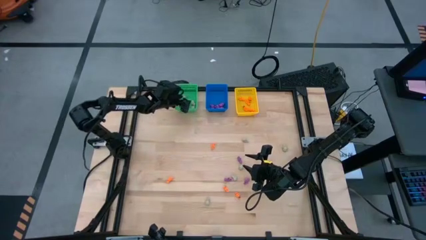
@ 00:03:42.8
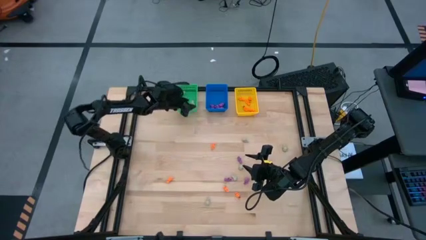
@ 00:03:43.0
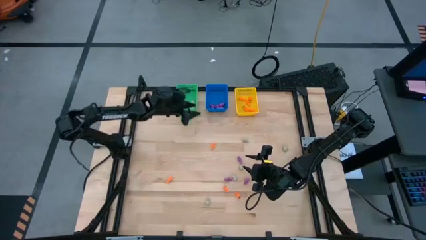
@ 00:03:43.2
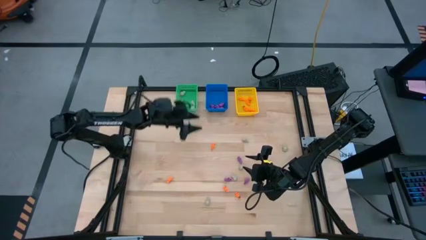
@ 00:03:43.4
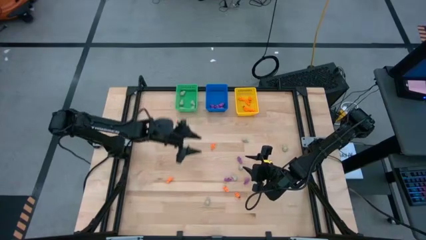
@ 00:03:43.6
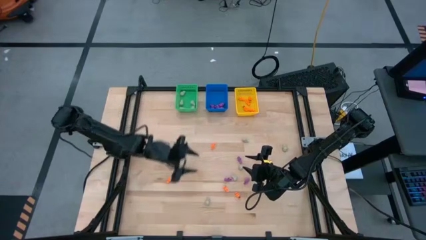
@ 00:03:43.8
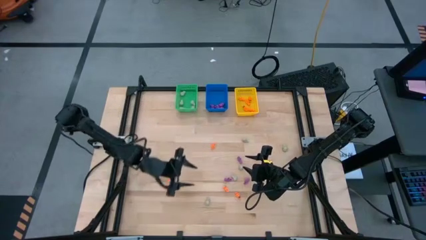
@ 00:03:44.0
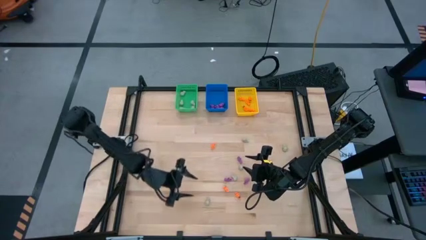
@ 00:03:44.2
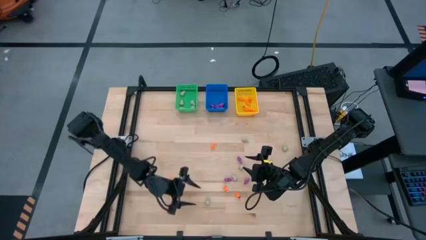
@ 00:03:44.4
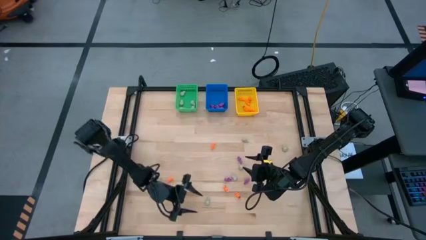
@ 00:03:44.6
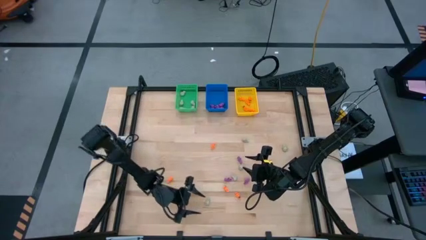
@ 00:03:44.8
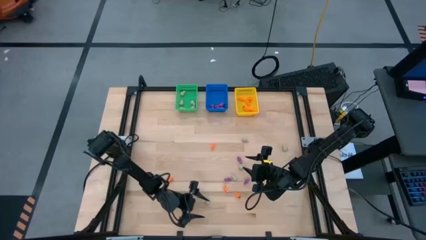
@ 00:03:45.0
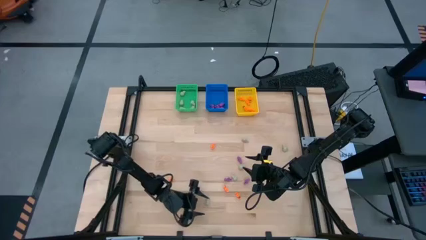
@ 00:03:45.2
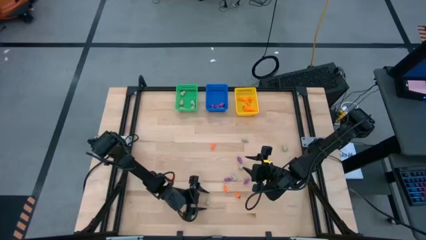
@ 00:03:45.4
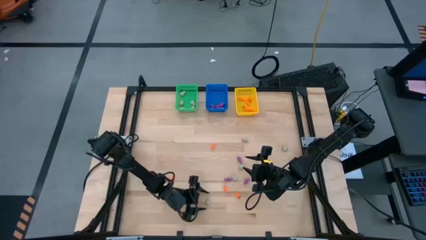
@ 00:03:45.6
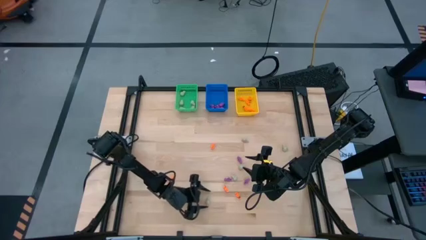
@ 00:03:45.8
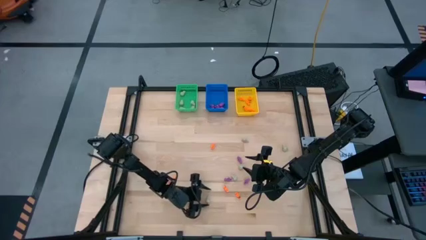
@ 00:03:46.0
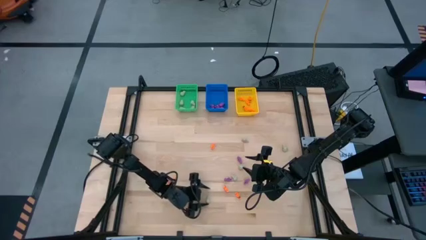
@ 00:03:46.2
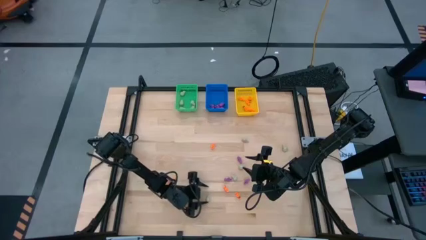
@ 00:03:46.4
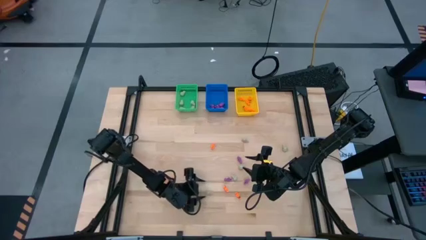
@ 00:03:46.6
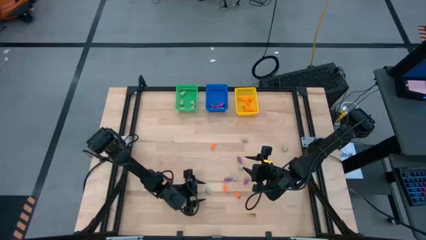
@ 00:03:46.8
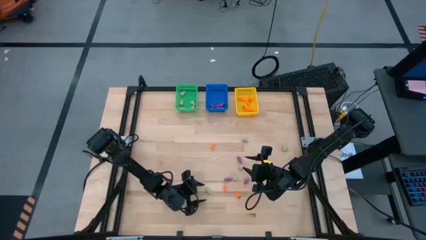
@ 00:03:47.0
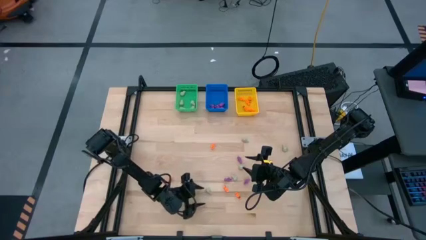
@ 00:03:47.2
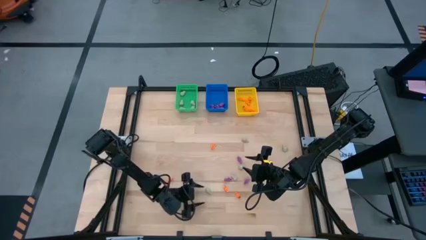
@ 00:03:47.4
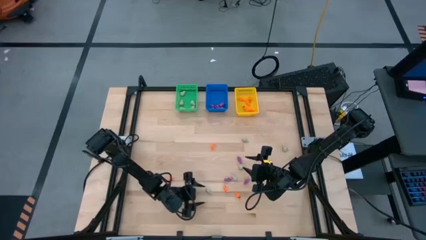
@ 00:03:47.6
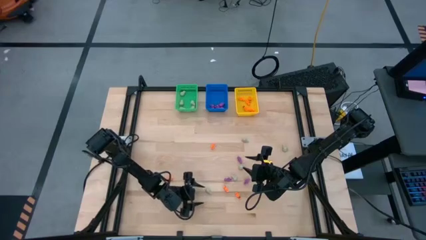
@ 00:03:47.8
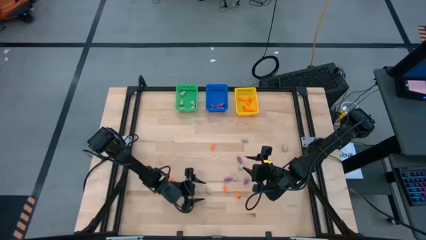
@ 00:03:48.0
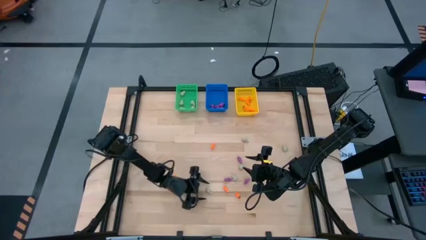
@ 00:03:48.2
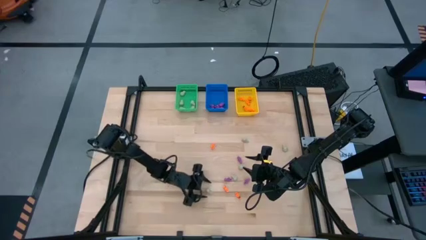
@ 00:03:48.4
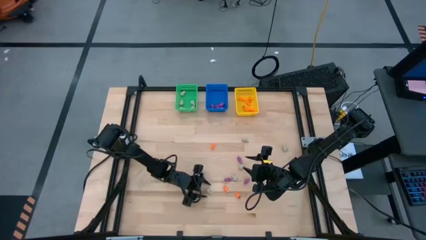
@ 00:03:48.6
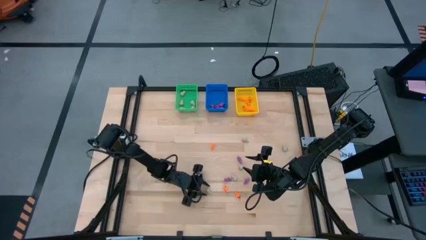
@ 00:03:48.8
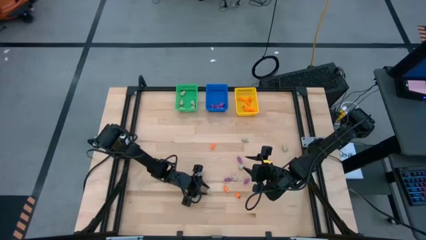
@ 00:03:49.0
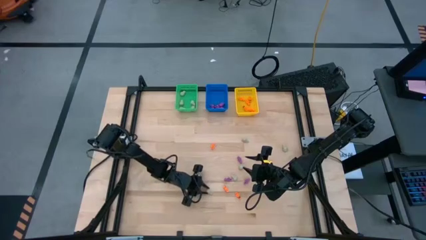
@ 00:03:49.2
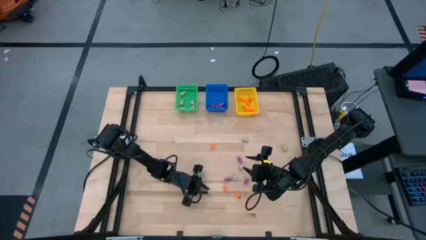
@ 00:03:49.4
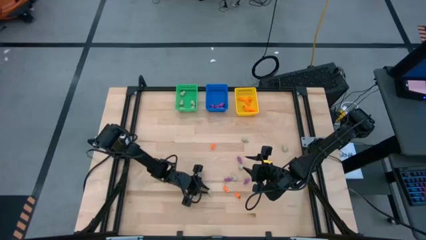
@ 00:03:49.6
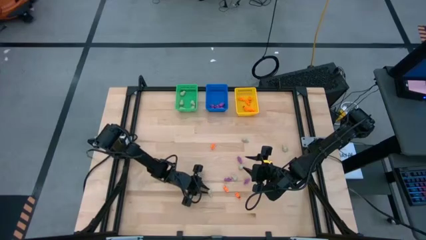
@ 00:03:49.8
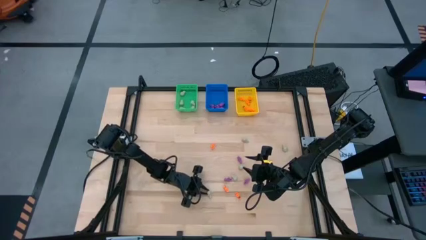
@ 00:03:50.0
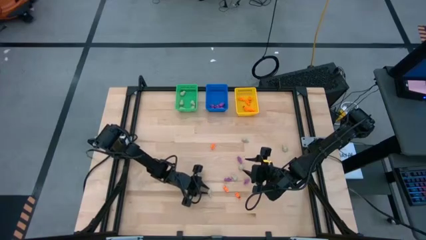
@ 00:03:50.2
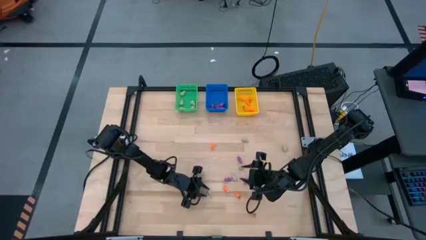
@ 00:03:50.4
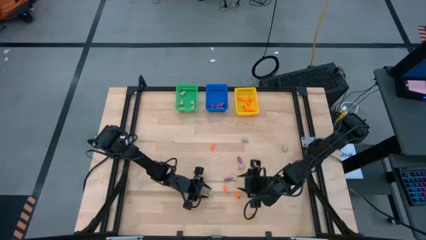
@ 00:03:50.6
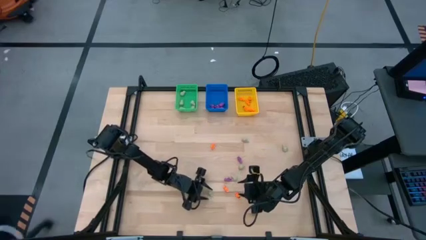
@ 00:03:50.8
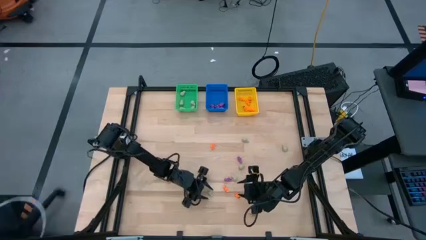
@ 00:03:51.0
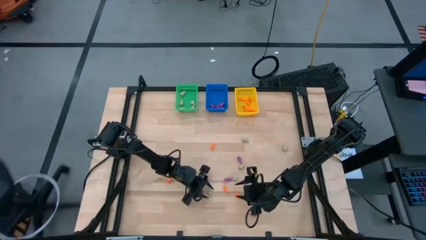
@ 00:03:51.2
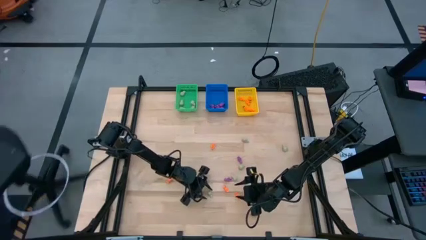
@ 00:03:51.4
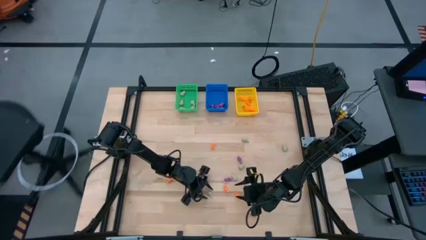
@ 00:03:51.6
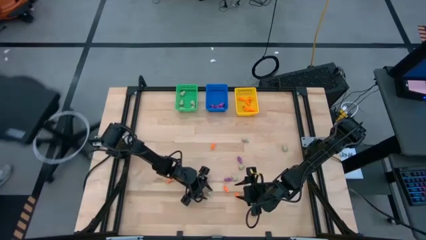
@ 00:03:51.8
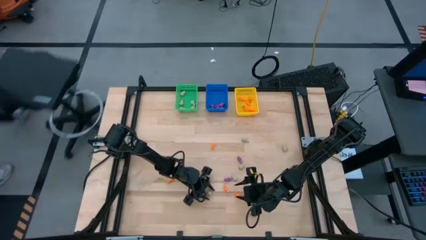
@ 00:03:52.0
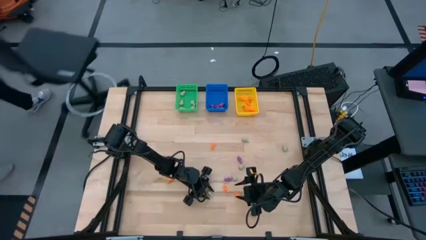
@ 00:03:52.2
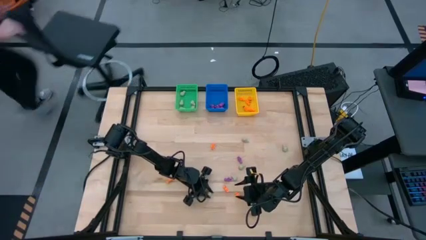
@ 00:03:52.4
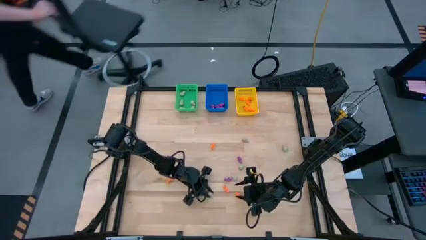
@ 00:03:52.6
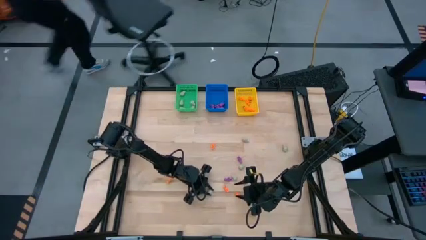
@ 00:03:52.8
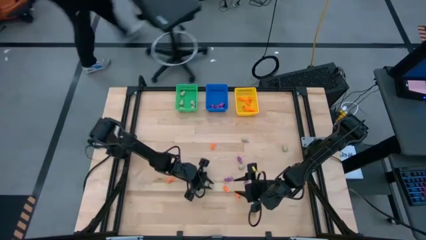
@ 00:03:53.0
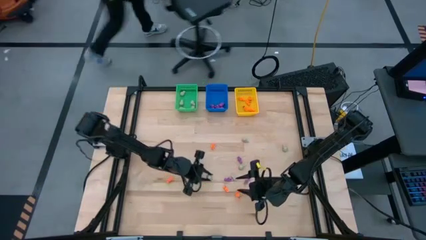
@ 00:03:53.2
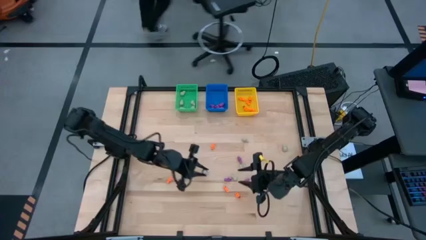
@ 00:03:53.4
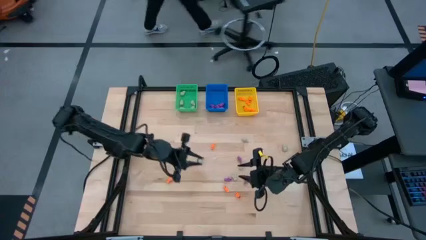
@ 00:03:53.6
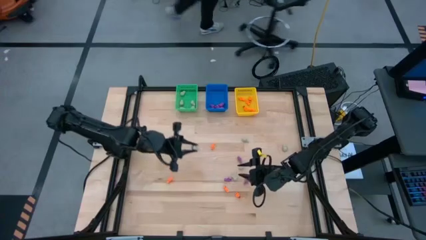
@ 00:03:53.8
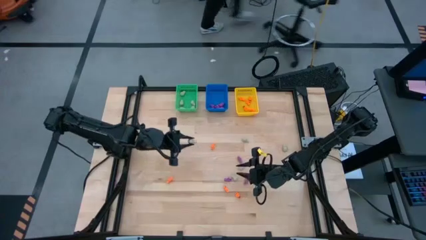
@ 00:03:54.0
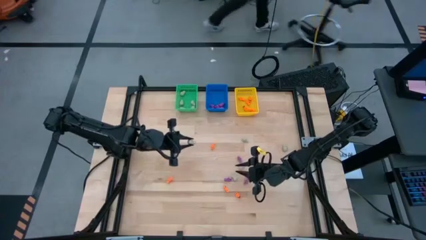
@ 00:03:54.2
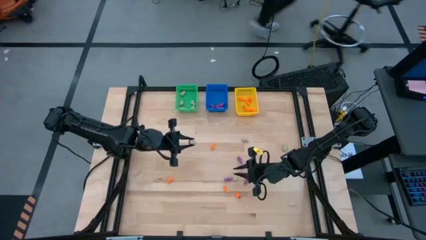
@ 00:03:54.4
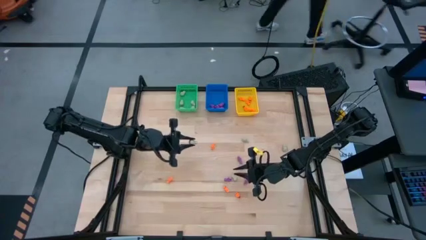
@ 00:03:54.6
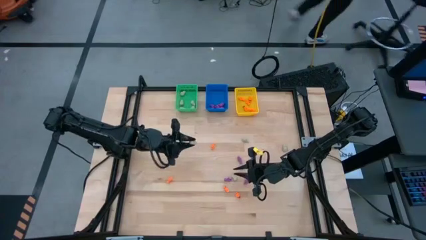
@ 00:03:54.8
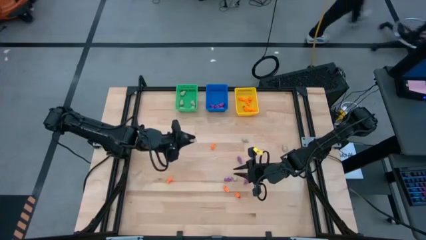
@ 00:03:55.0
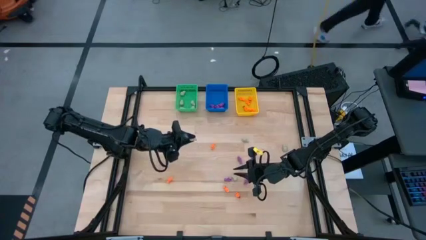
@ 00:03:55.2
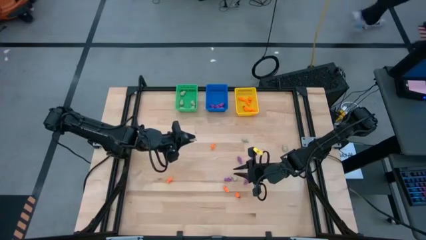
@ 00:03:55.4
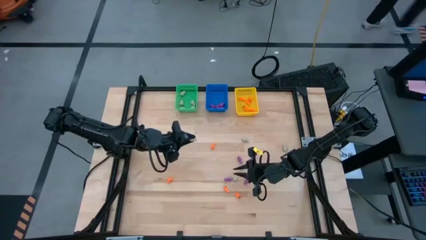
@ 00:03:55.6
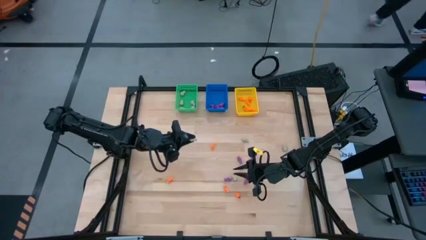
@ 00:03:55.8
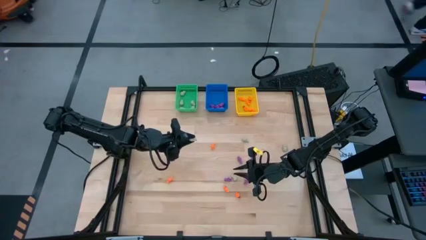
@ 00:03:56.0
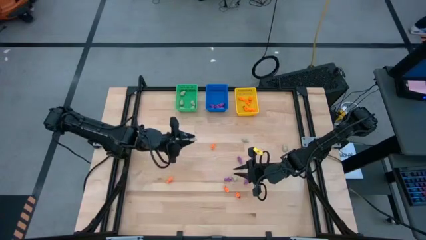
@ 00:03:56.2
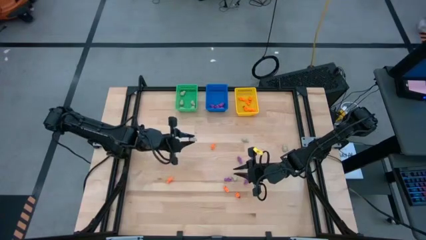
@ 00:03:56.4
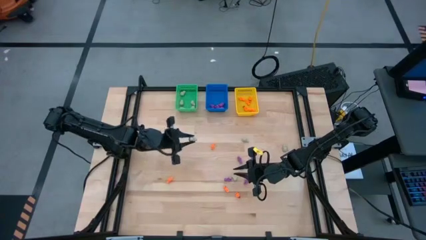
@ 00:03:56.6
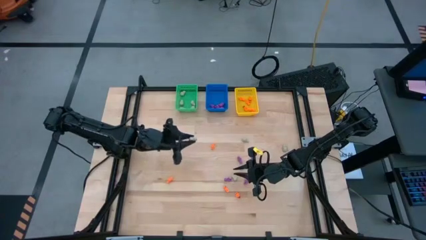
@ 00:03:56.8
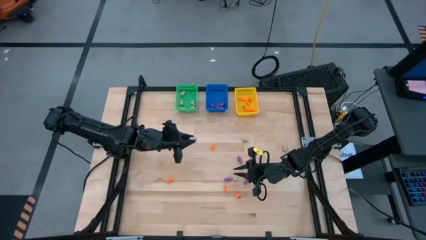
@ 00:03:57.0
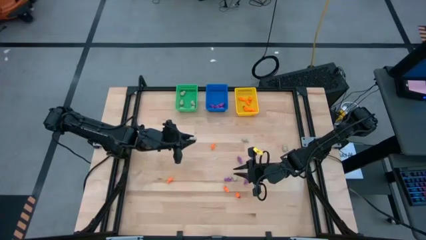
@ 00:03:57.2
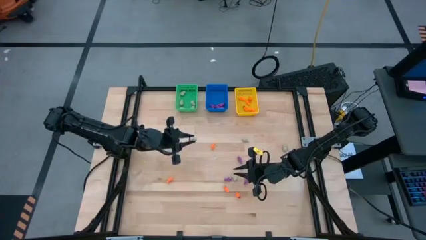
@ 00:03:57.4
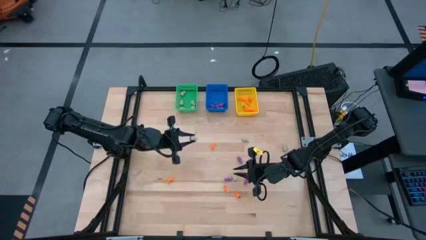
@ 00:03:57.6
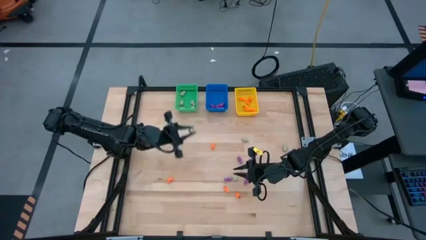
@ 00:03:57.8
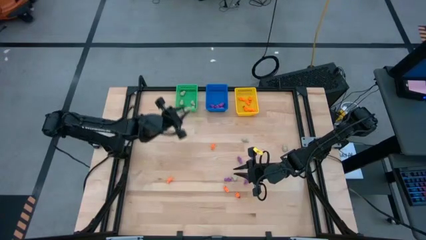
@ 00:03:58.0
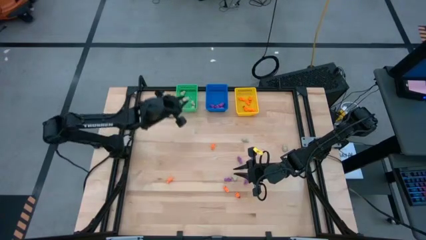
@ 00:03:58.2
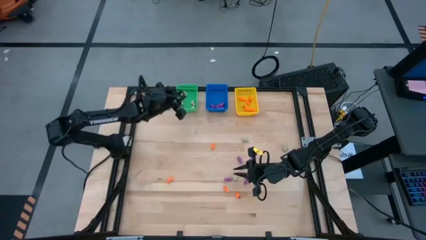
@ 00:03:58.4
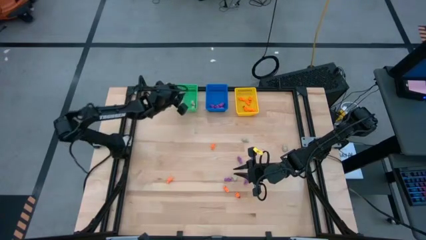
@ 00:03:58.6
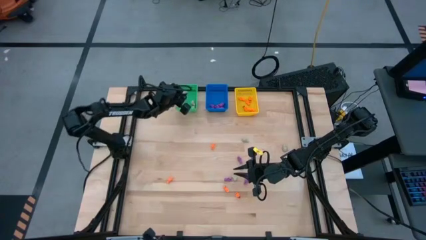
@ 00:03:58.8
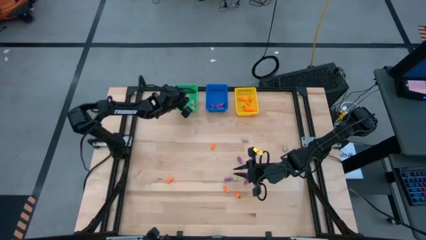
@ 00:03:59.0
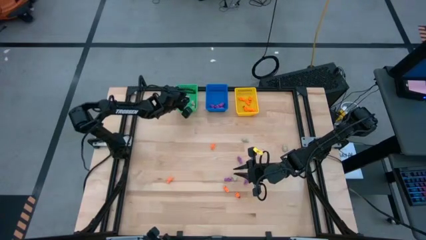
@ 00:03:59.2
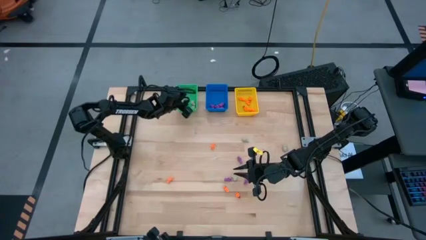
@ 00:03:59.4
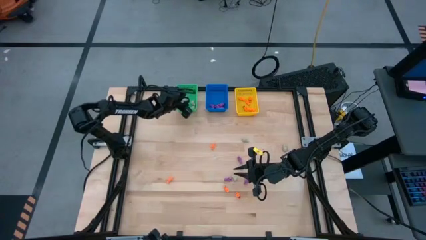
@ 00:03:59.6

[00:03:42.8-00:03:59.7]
Task: Sort Halloween decoration
Put the gray skull toy into the green bin
